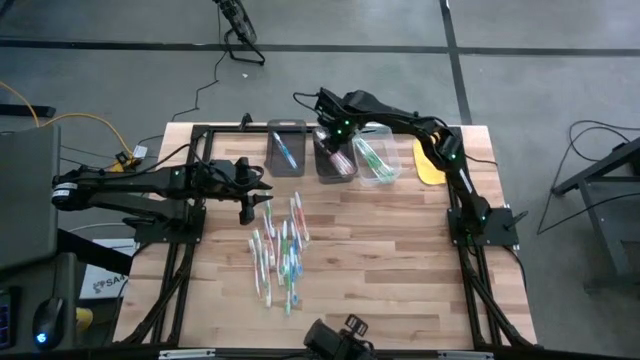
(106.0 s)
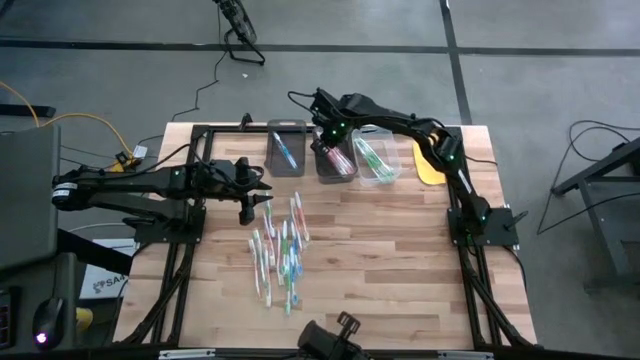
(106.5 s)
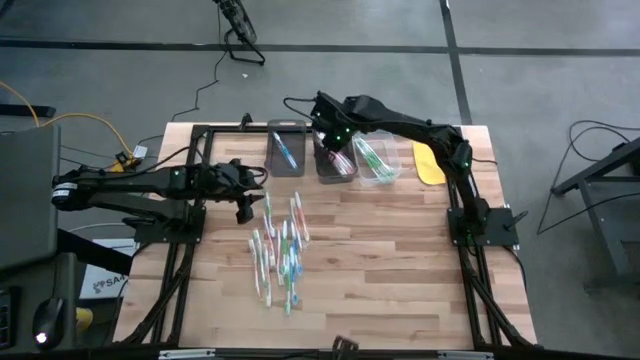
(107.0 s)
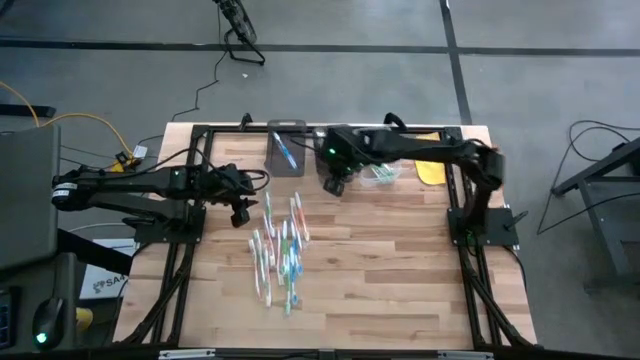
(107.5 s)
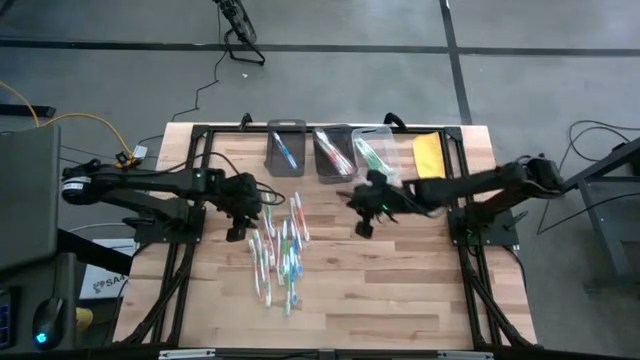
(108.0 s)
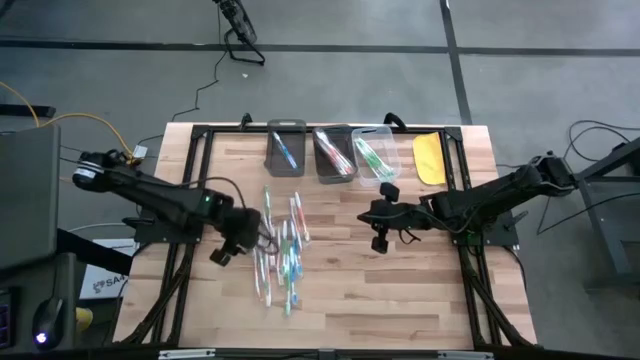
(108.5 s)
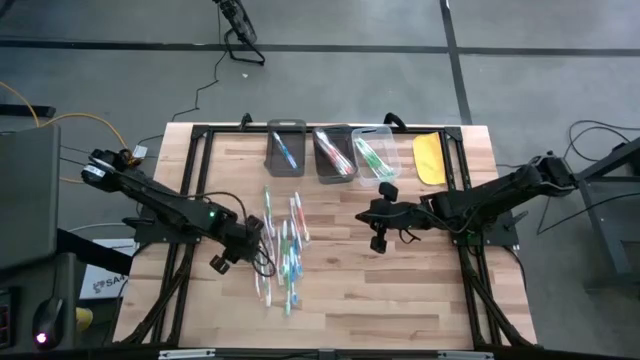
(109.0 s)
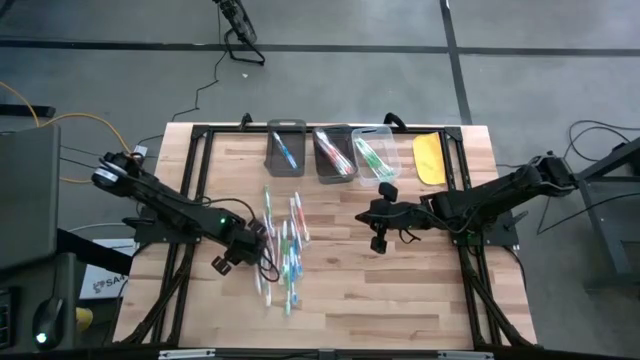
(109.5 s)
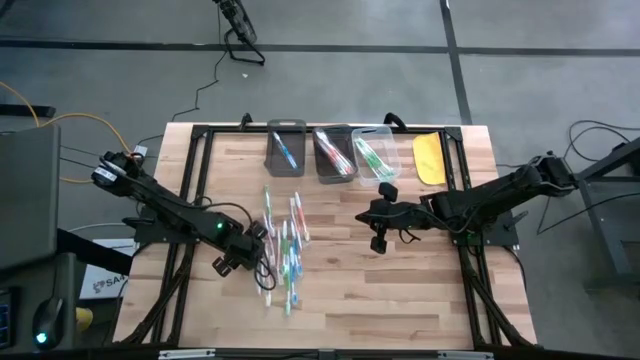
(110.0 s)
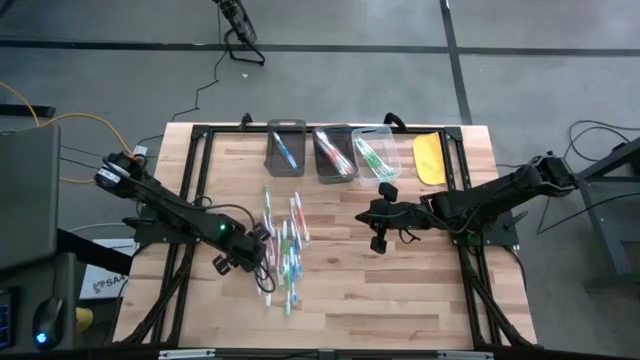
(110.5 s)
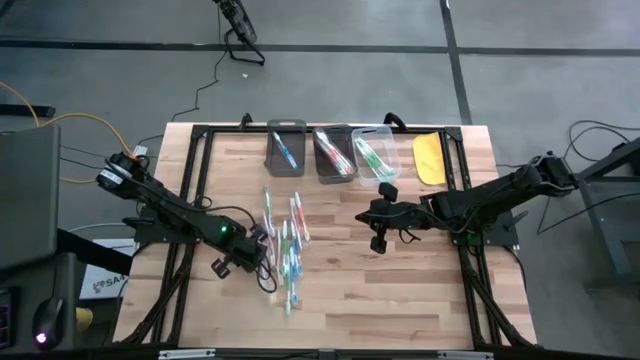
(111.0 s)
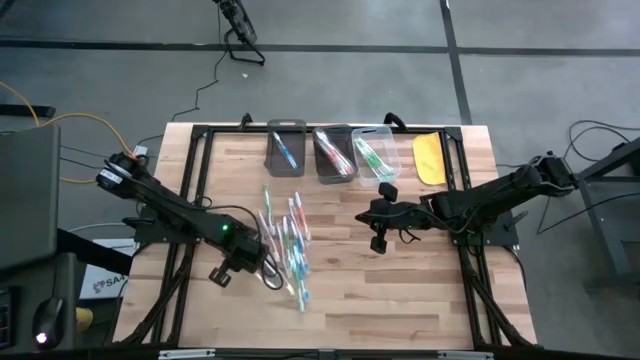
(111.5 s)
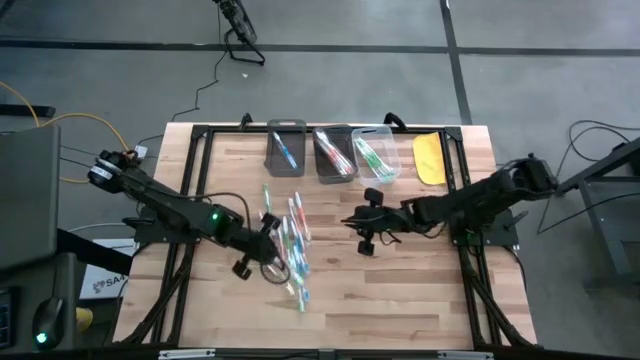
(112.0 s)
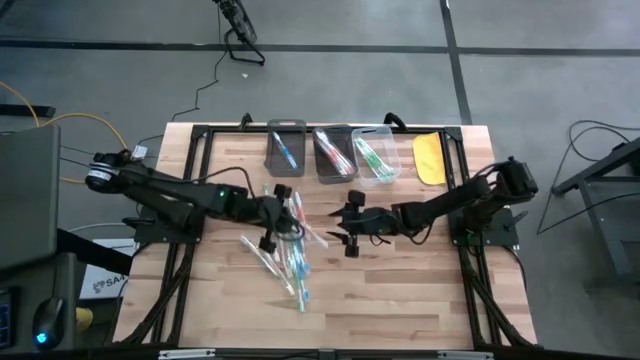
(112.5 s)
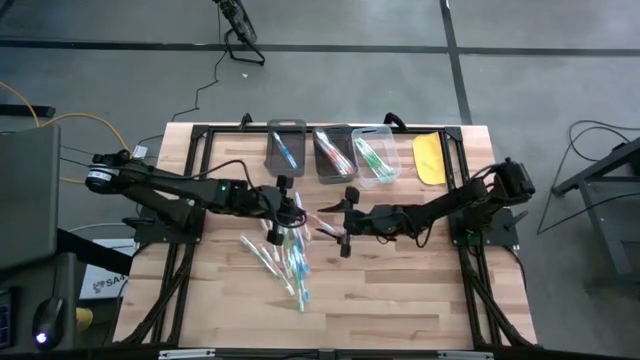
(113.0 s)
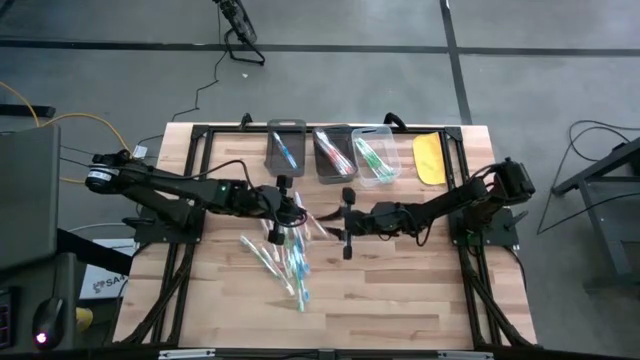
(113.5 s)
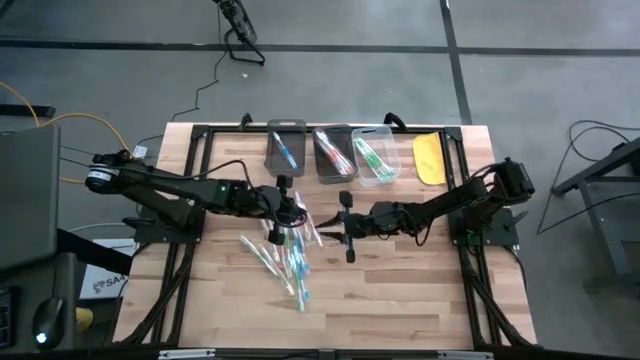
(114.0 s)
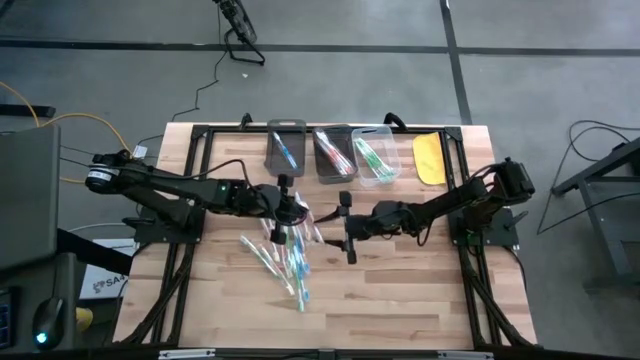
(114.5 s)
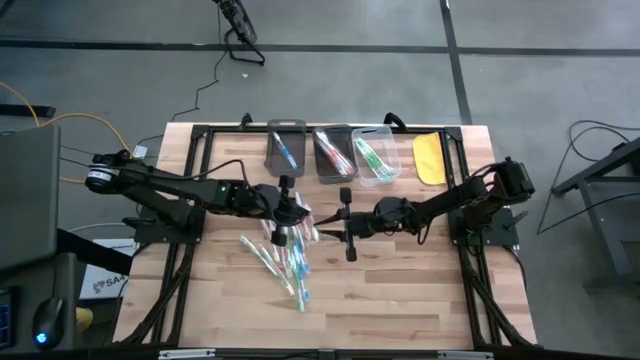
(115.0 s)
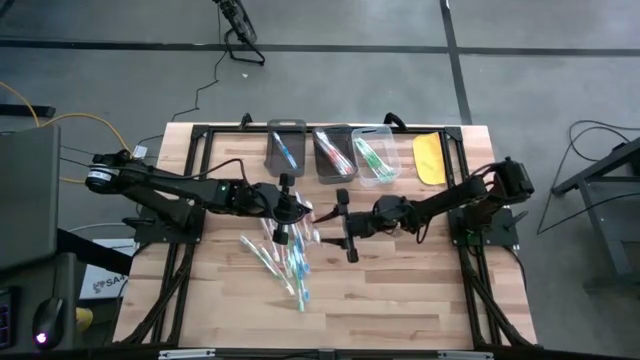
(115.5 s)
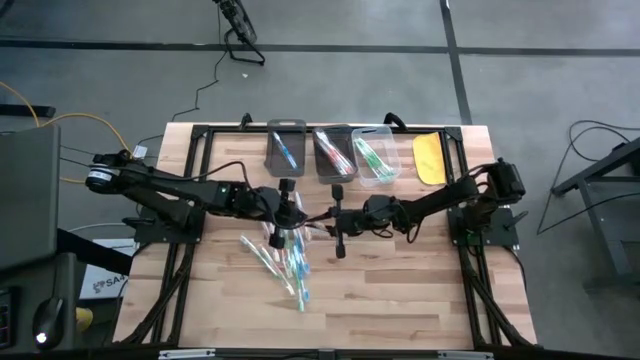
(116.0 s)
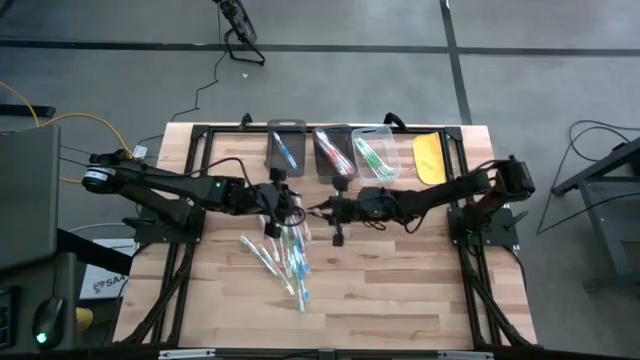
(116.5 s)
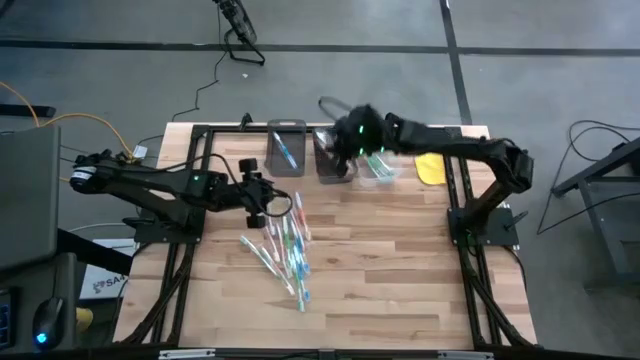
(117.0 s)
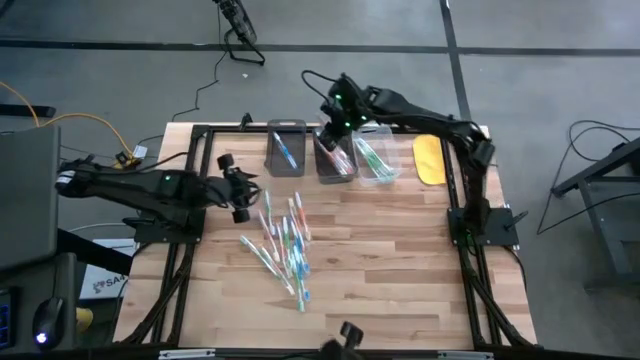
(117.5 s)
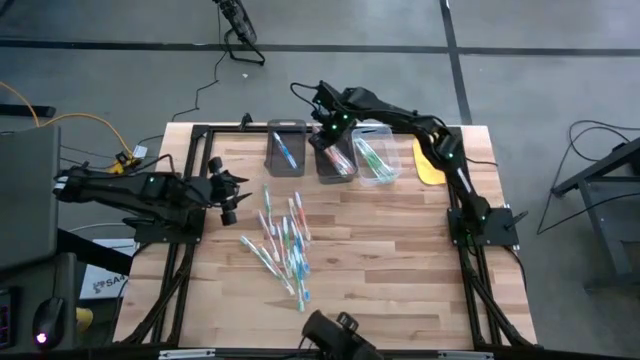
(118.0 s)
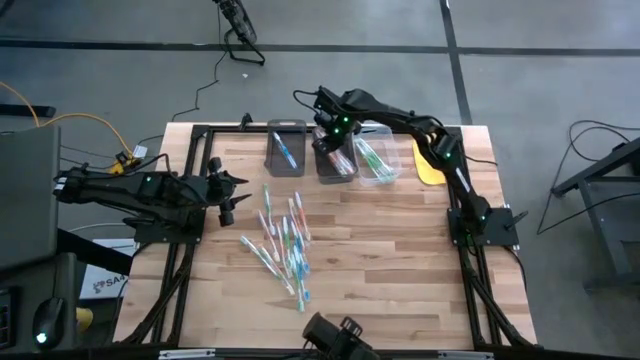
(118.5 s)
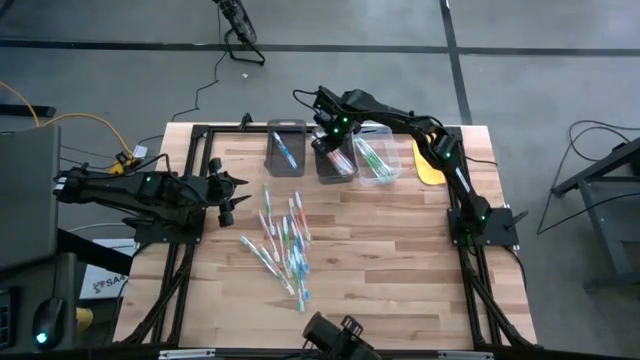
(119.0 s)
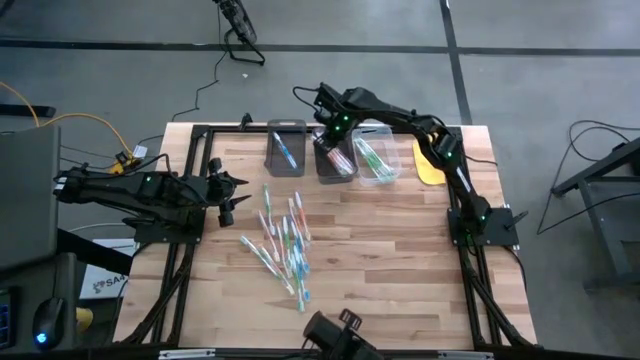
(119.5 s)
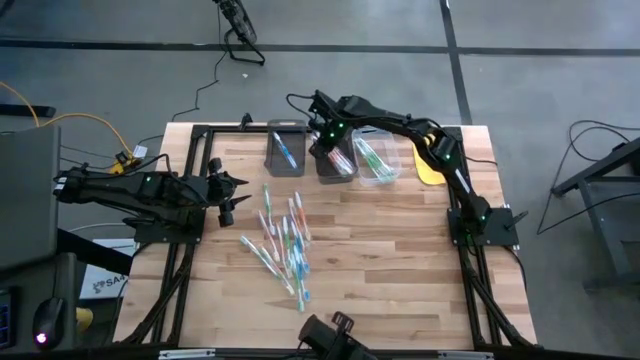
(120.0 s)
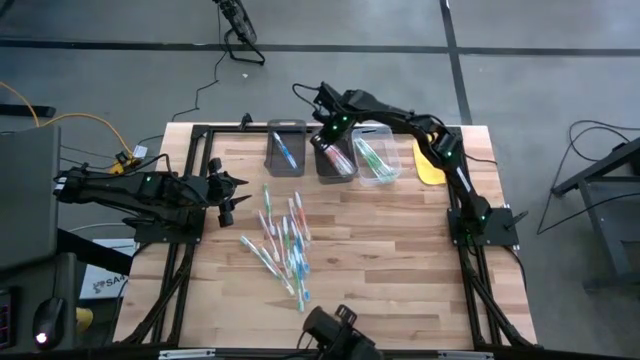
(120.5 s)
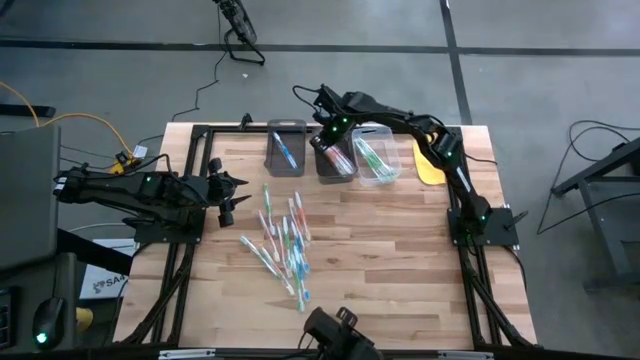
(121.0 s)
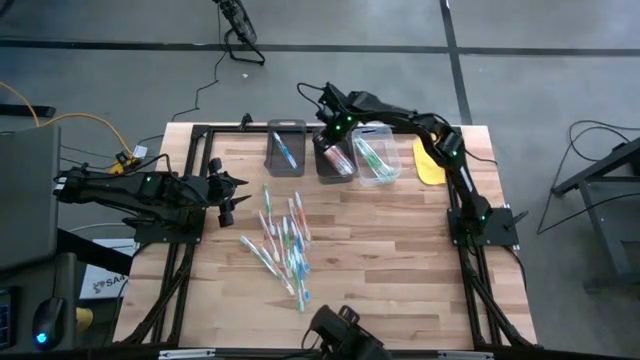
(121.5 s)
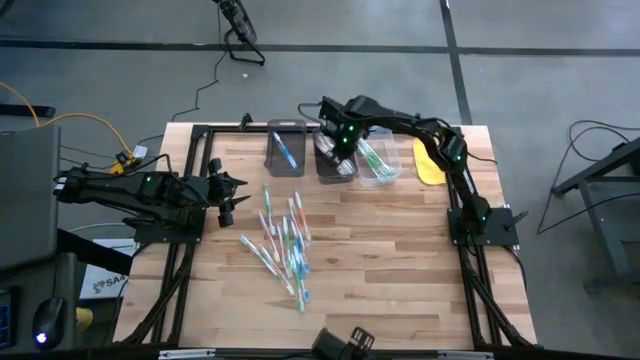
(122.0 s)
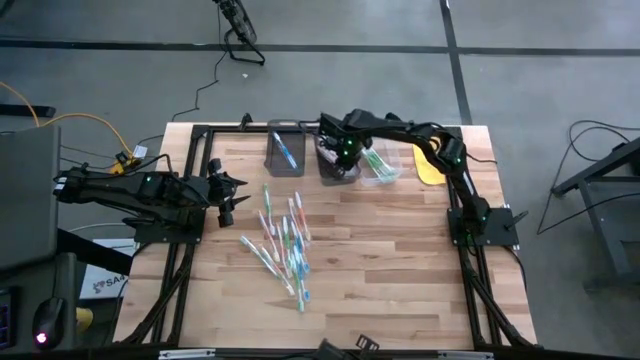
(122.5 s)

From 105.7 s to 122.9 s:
Task: Pick & Place Toothbrushes
Put the orange toothbrush into the right black bin

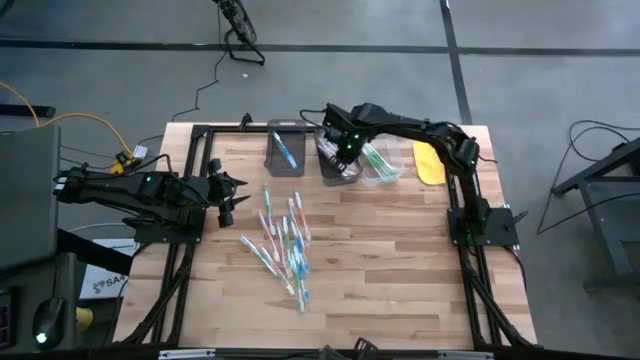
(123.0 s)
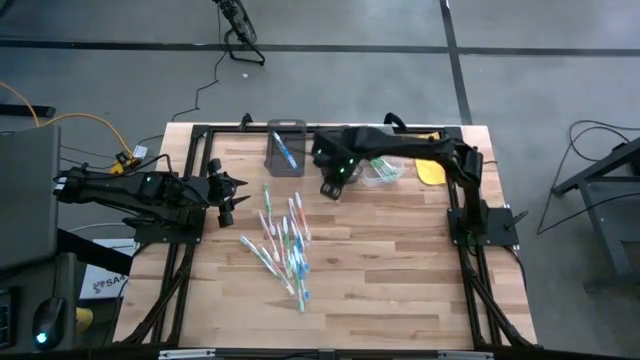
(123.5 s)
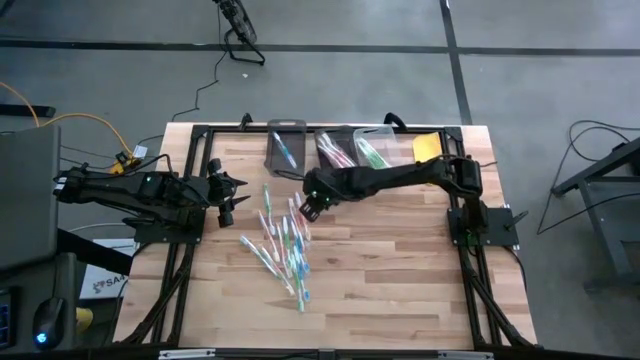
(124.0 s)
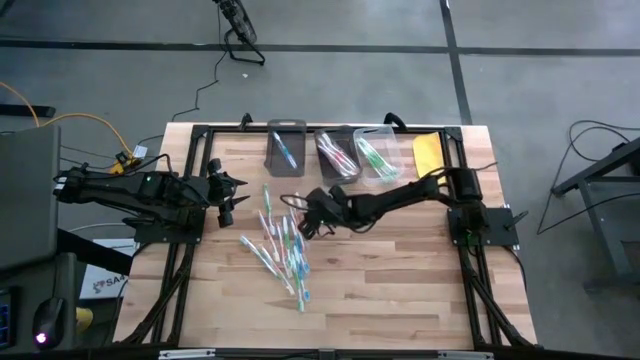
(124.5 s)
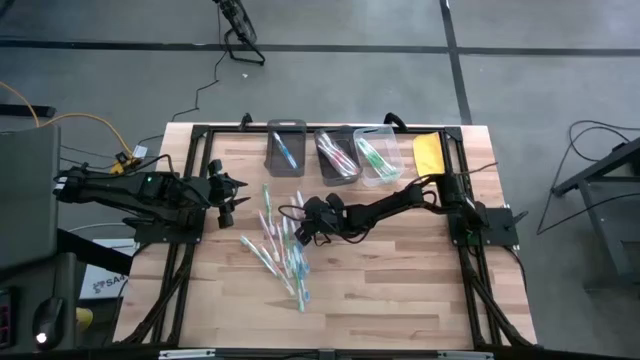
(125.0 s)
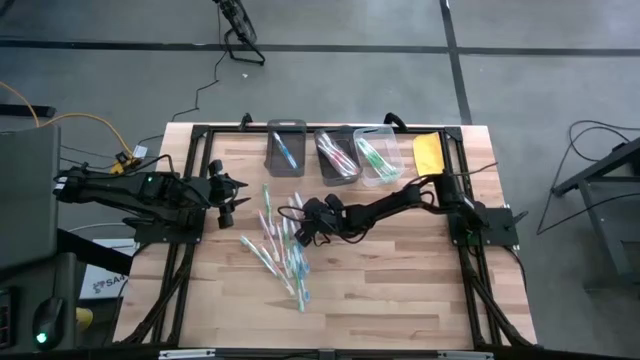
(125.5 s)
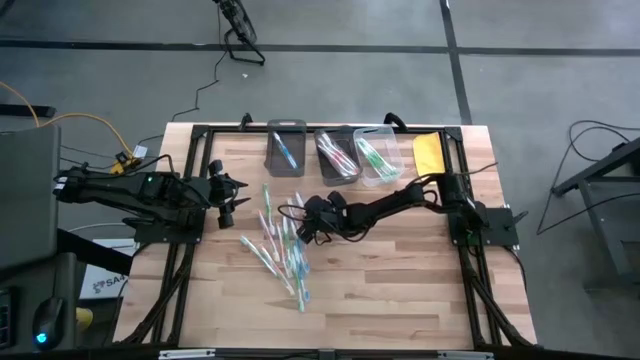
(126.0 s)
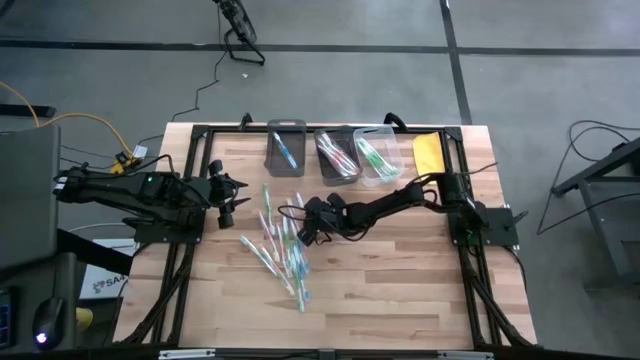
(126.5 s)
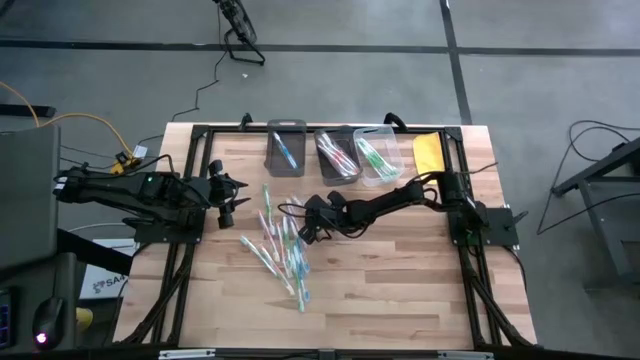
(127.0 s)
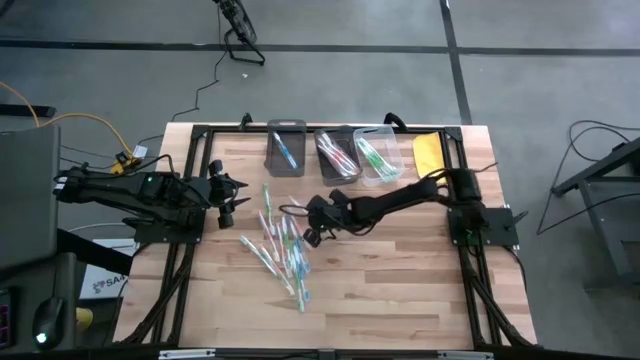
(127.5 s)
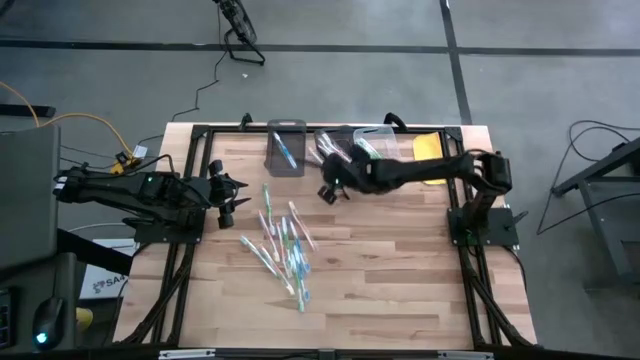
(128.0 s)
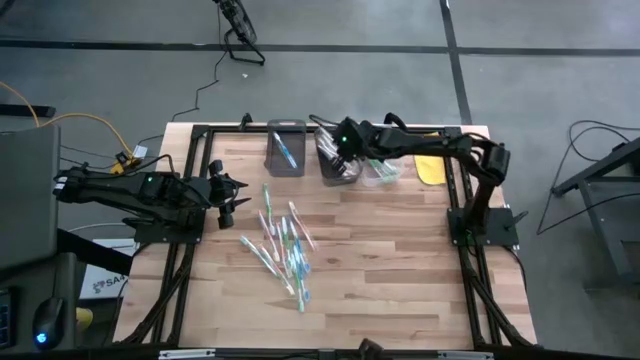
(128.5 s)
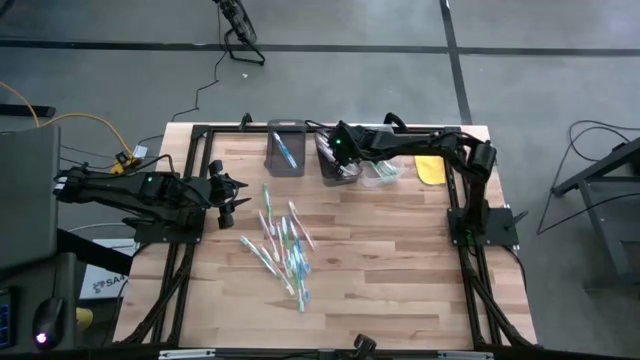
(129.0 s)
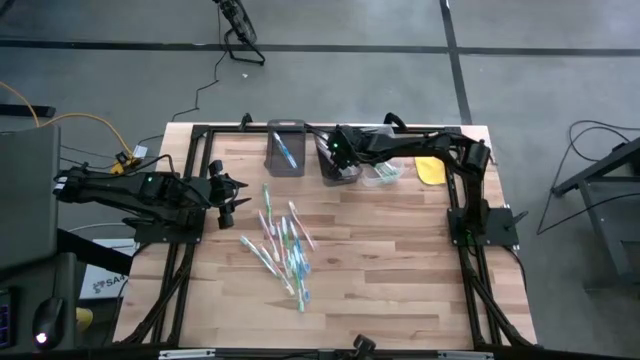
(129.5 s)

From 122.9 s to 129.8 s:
Put the orange toothbrush into the right black bin
